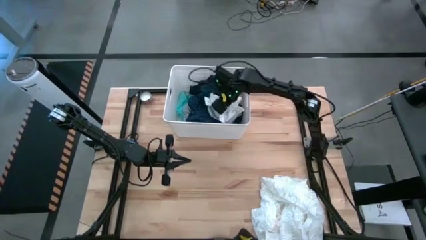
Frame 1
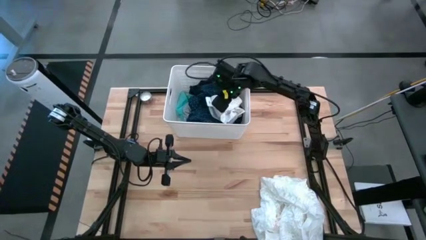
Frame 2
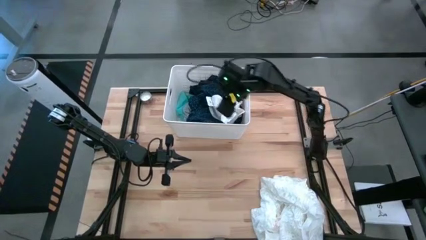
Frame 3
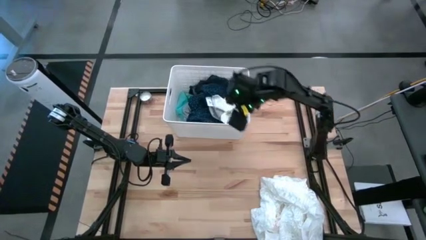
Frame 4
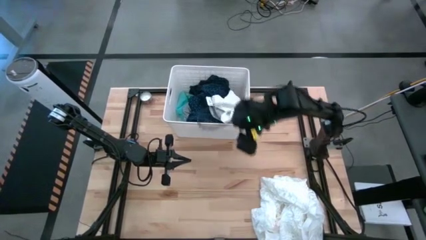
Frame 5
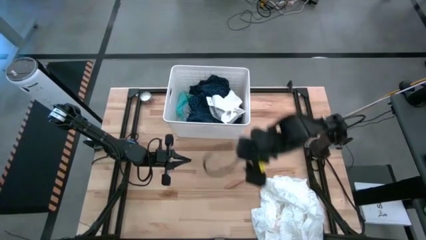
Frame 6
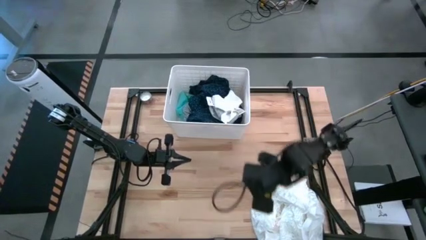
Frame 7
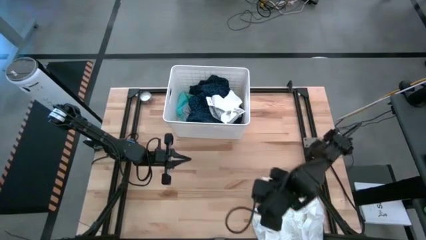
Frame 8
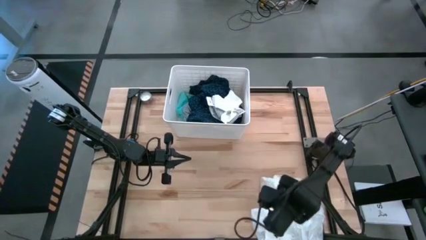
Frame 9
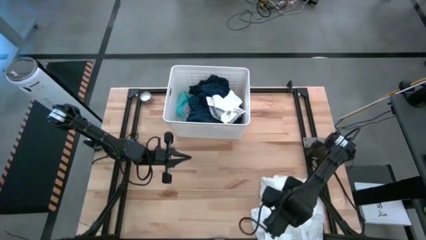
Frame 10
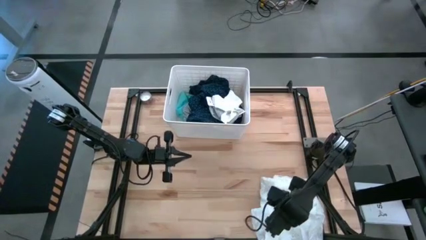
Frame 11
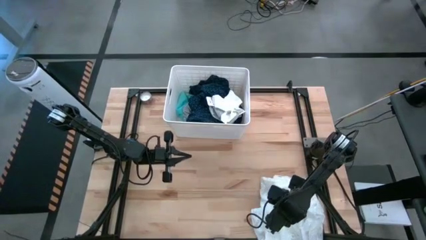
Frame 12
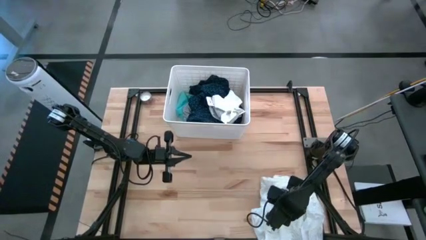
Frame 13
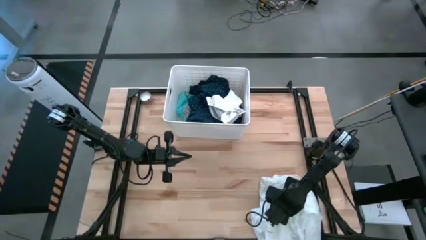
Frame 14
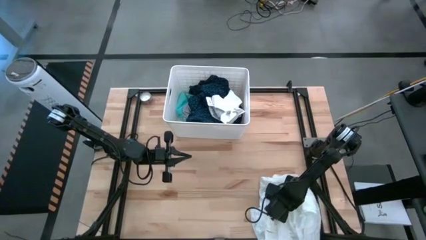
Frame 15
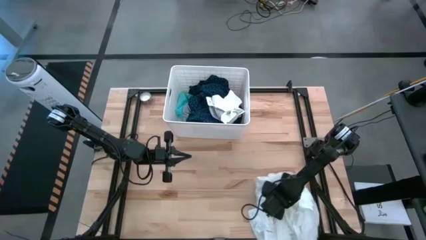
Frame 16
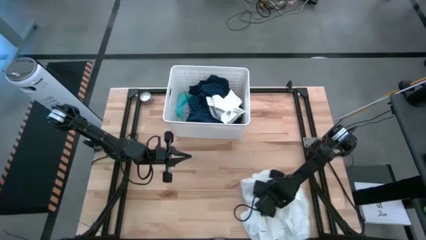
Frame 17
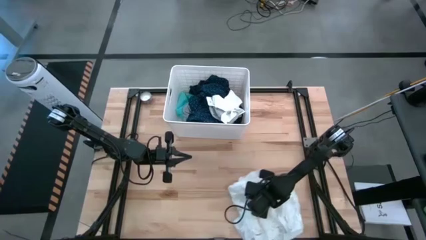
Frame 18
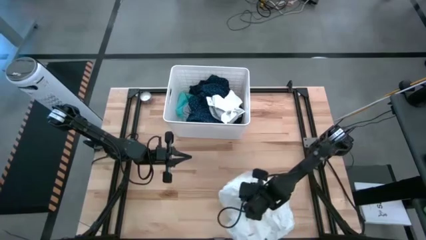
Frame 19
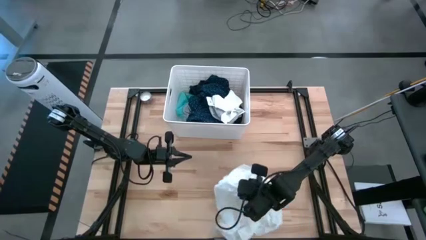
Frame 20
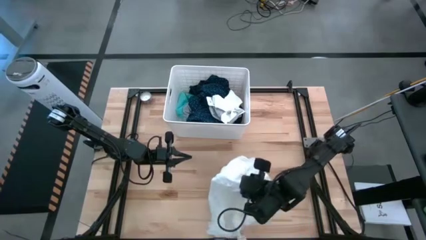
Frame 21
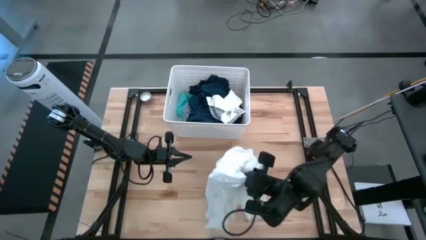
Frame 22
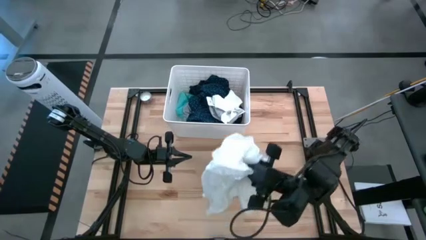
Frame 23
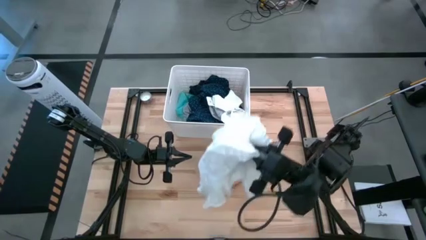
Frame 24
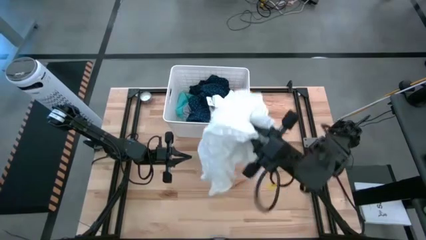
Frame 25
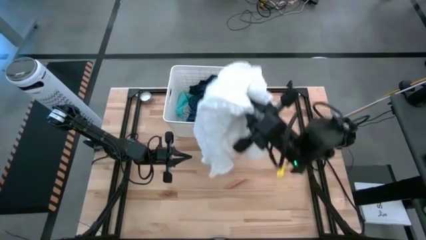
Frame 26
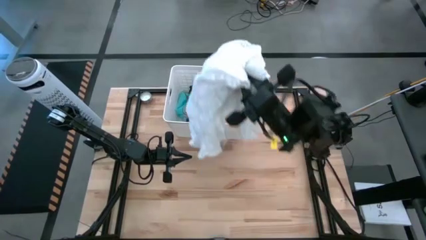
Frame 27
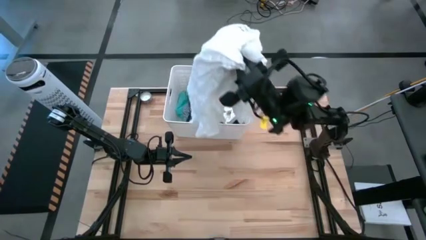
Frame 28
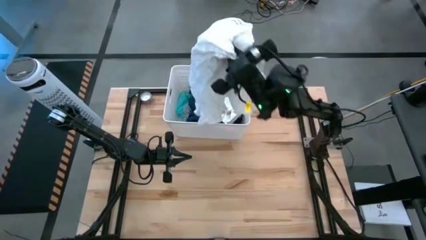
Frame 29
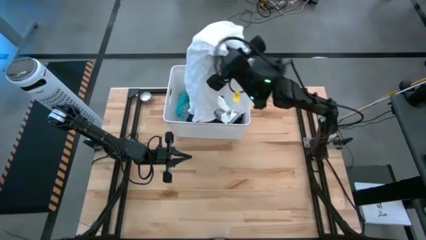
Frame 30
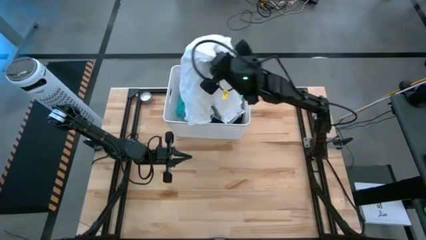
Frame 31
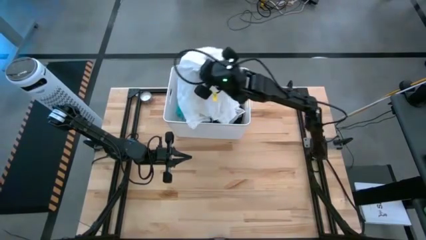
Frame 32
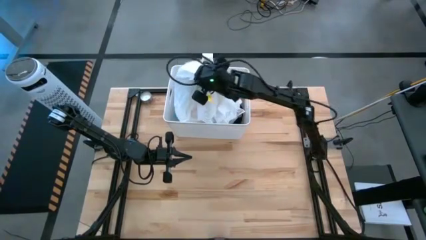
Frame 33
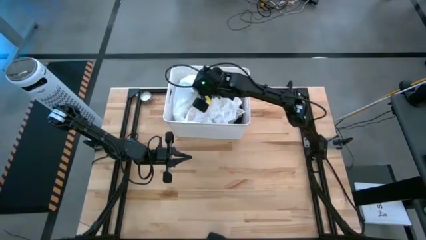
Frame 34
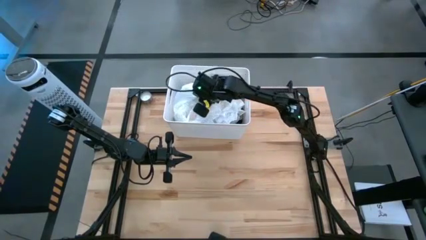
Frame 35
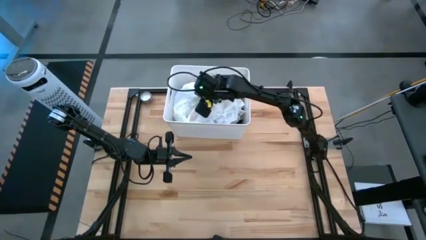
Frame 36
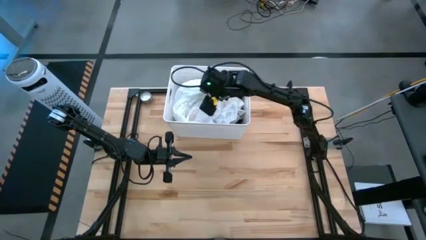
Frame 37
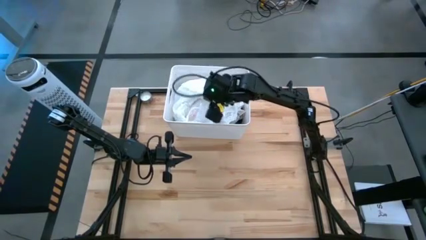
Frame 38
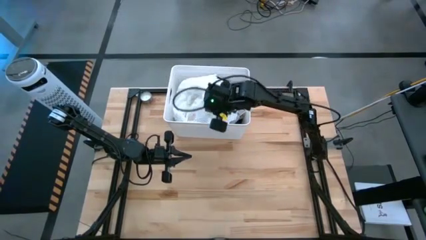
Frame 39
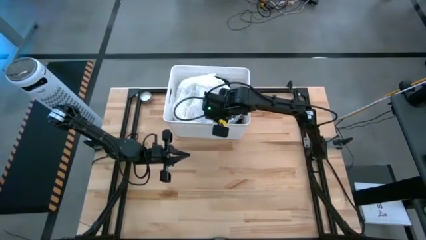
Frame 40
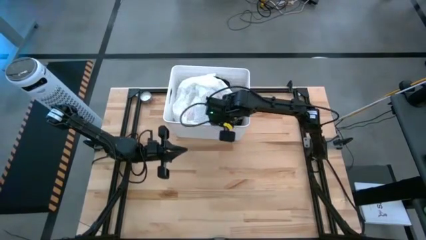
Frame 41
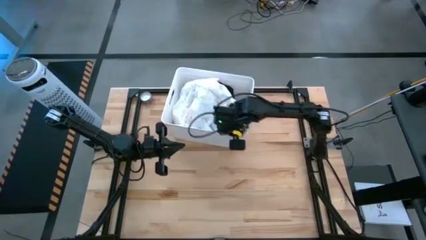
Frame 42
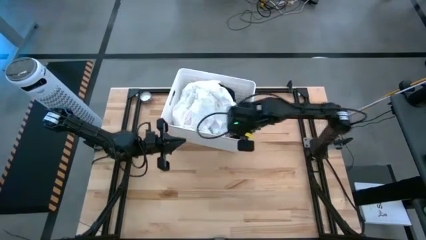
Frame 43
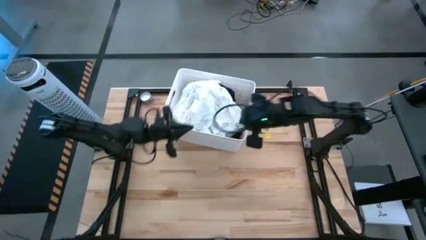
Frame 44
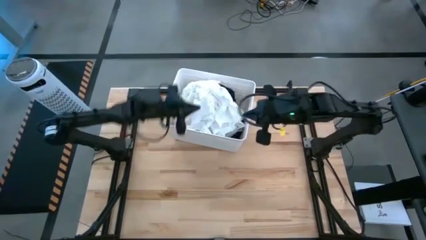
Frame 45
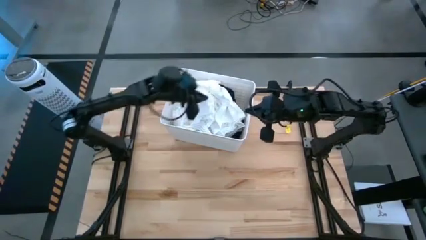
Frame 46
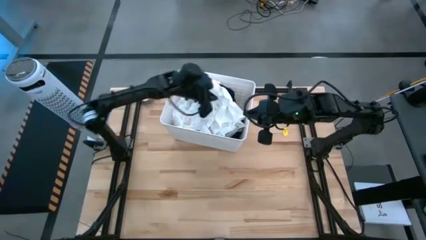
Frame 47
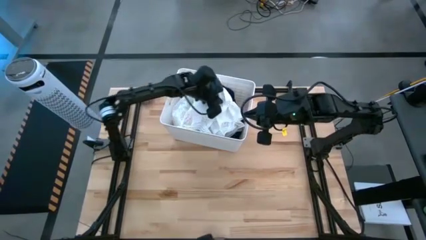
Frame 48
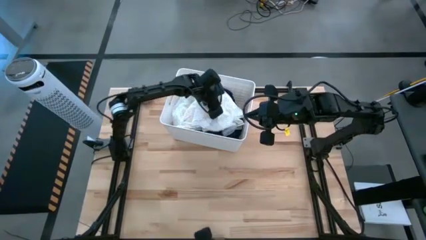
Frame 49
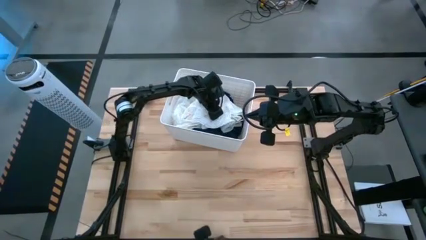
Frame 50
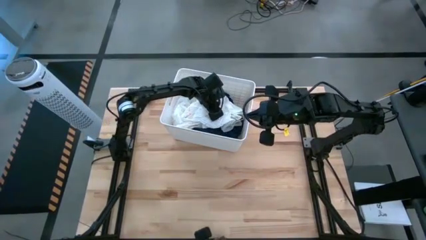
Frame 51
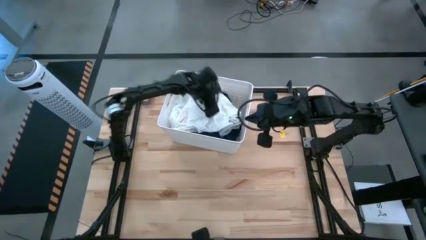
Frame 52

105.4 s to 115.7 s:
Task: Sort clothes
Put the white dress into the laundry organizer

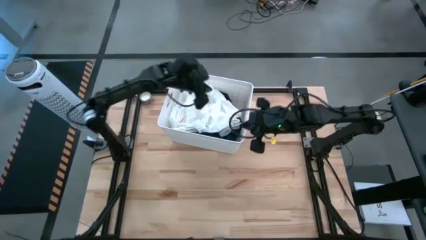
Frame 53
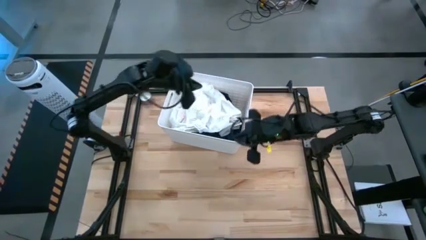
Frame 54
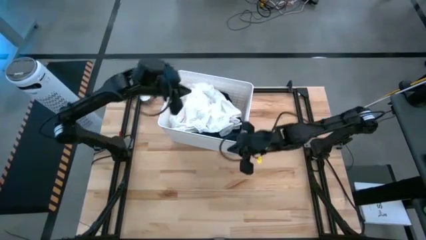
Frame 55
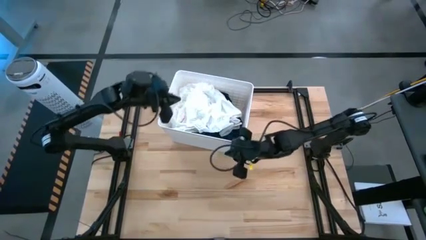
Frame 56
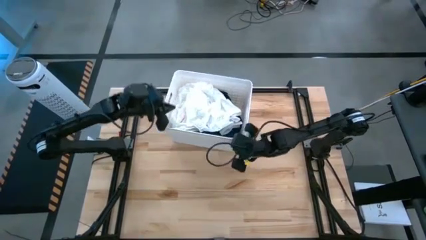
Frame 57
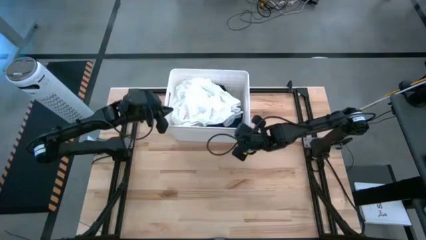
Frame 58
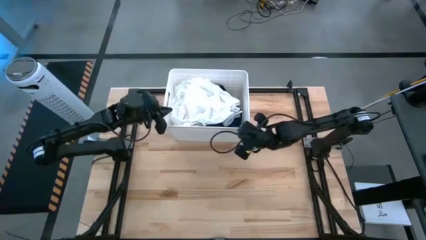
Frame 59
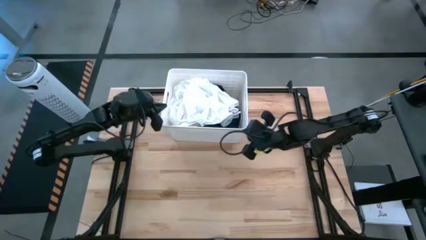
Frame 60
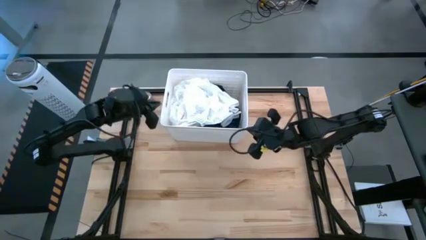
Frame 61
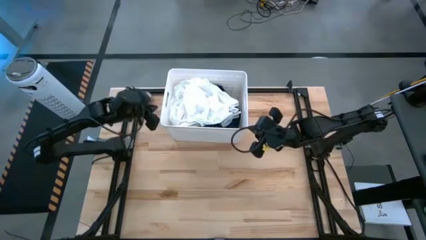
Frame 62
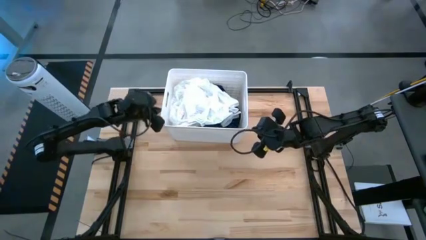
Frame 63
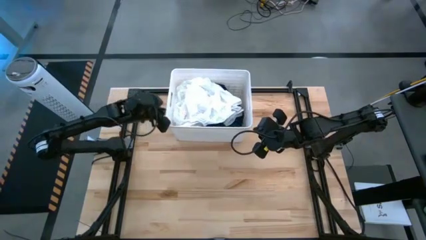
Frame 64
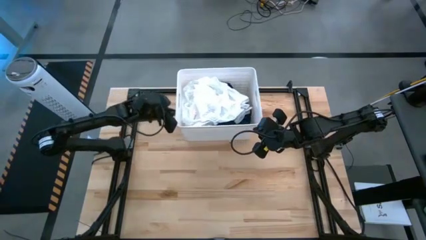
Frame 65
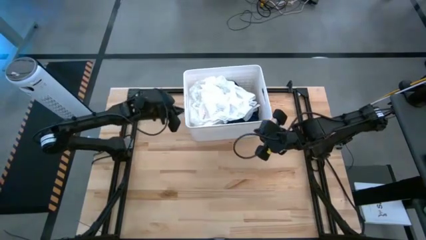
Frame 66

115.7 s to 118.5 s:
Adjust the laundry organizer

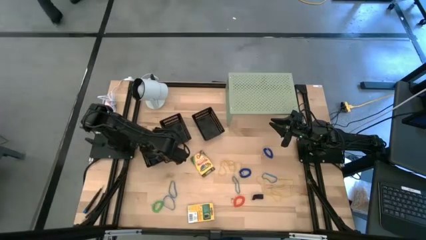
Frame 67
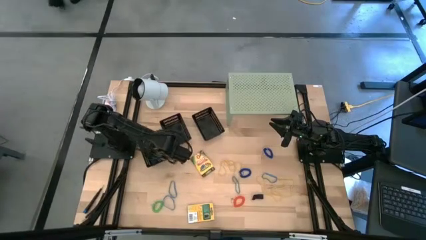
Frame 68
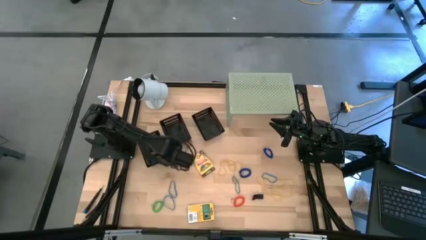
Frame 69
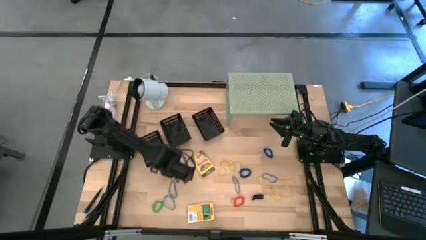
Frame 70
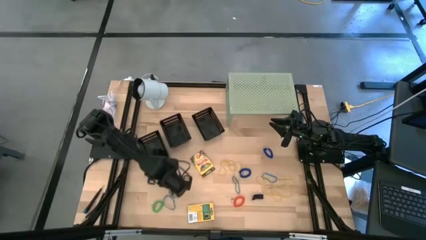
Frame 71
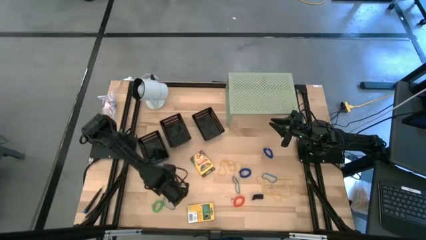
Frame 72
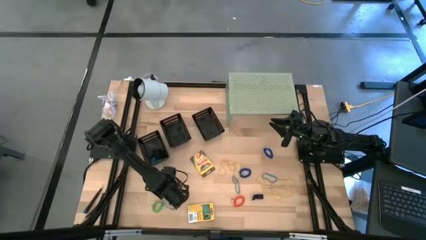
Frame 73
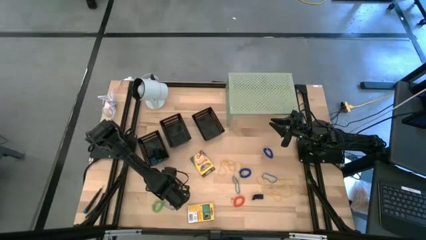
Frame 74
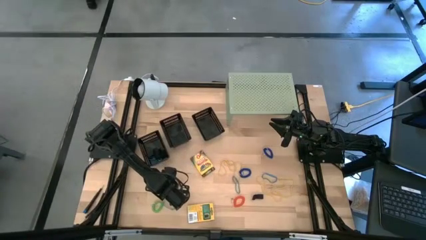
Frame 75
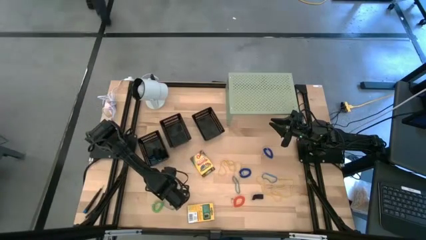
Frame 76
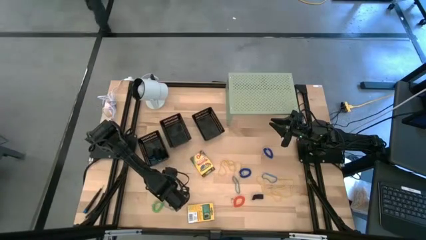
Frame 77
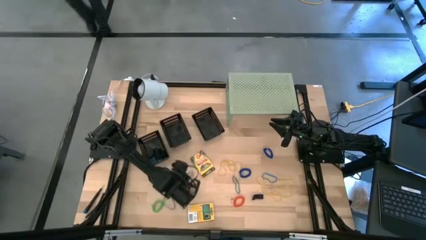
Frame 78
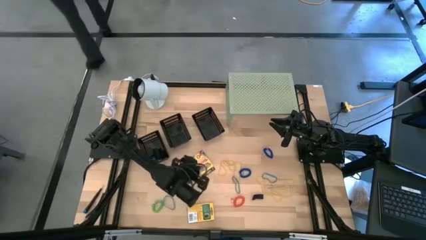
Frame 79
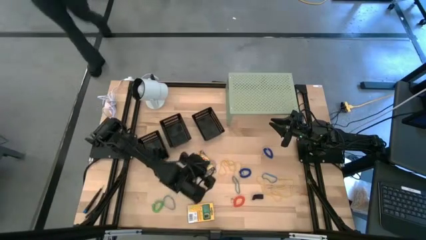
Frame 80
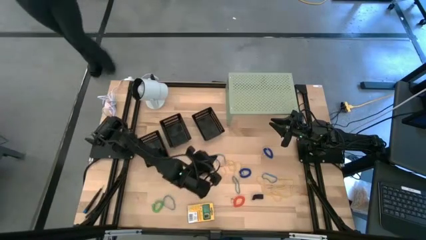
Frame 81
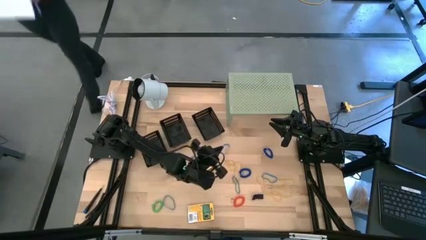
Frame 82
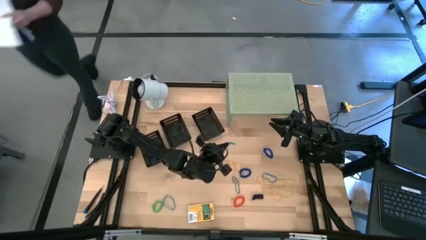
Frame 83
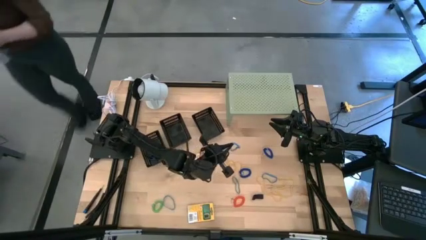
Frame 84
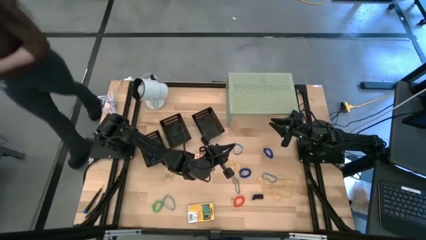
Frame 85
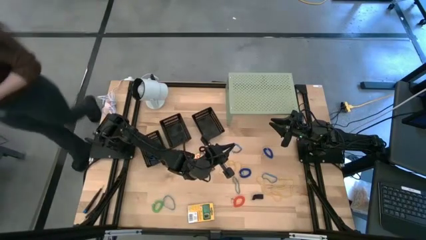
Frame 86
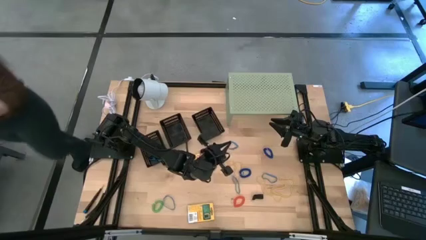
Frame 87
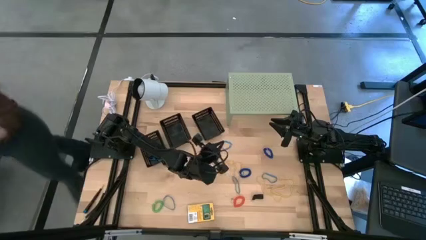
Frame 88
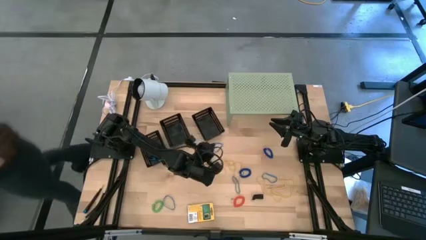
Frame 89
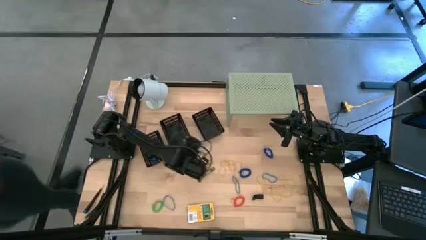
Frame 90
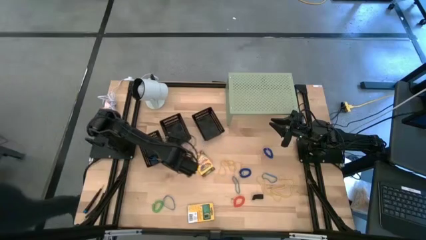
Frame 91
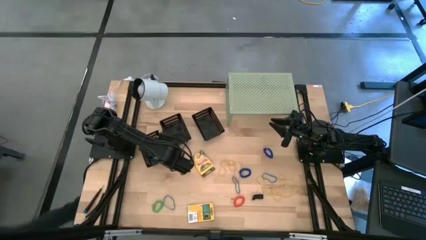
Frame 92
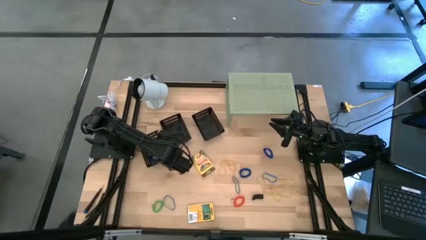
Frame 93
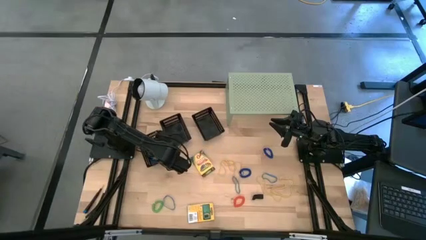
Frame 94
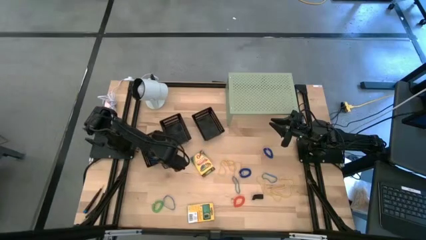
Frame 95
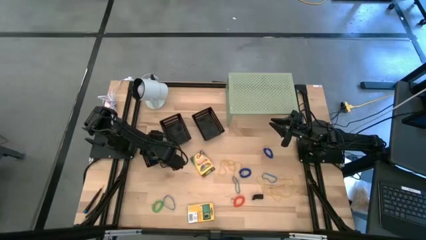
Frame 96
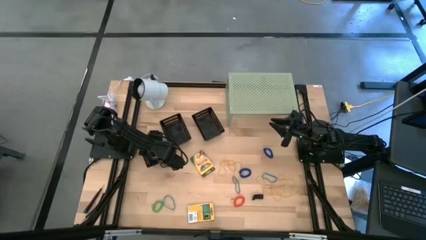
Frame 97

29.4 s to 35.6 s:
Task: Pick & Place Office Desk Supplies
Put the blue rubber band into the left black basket
